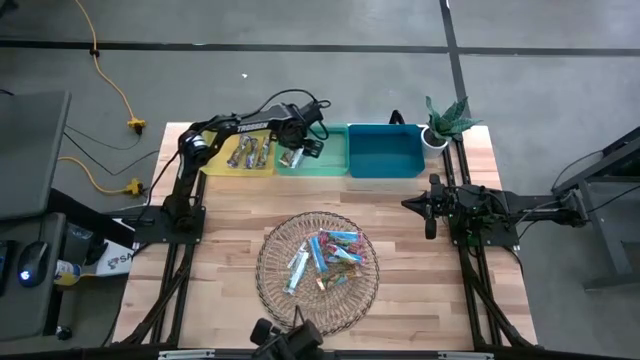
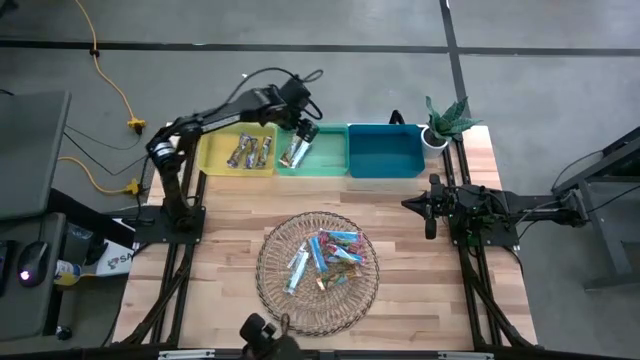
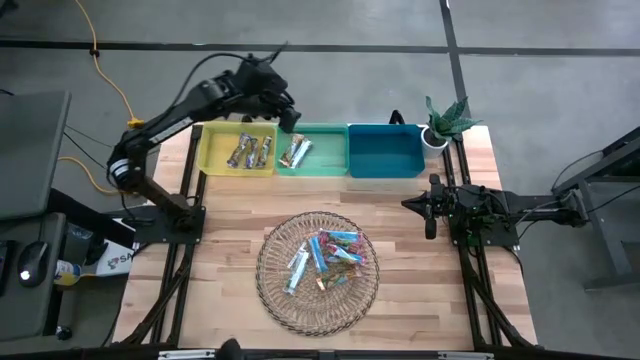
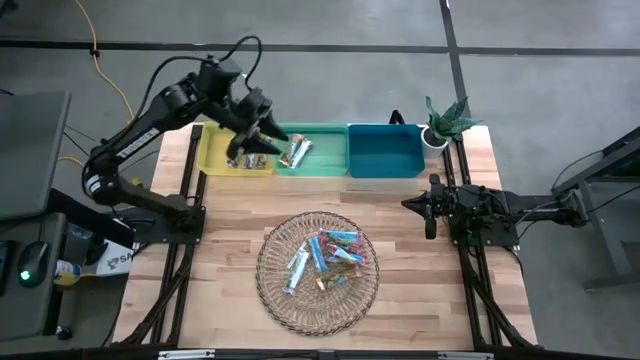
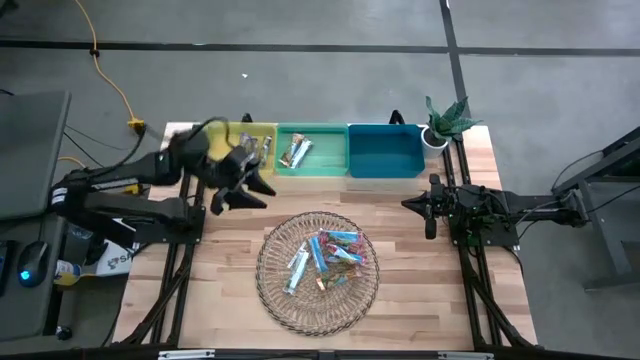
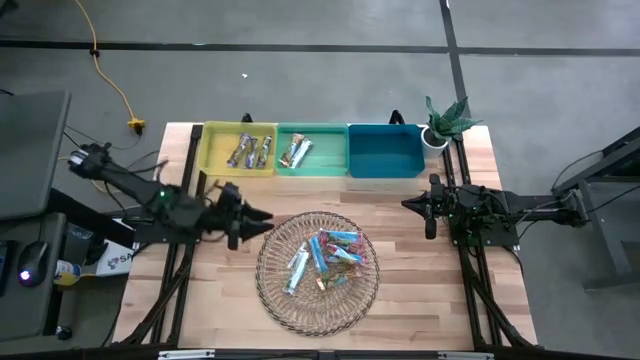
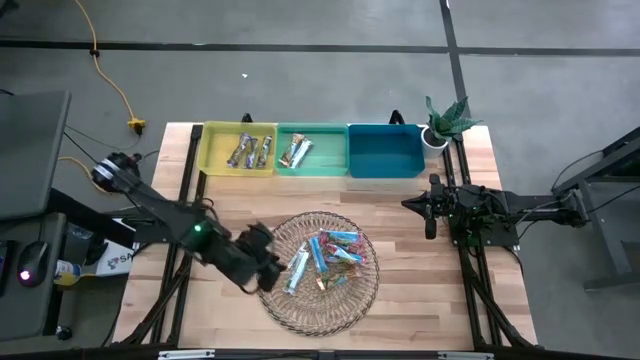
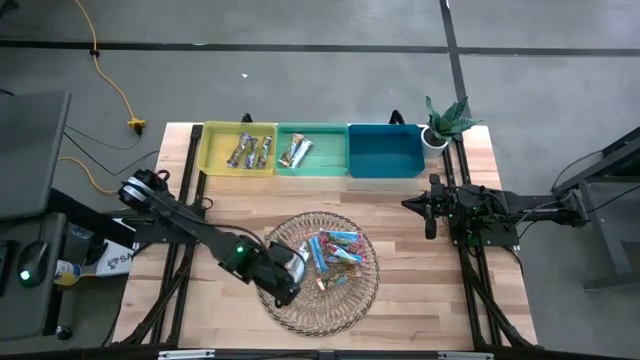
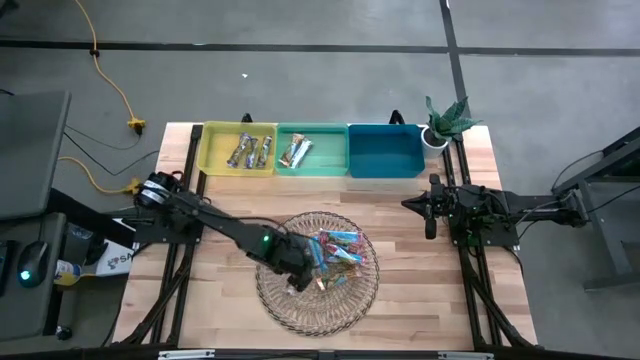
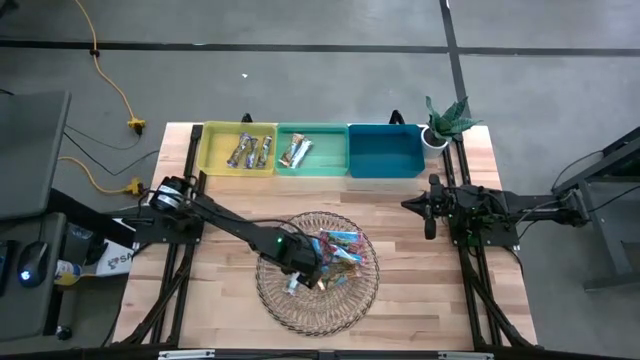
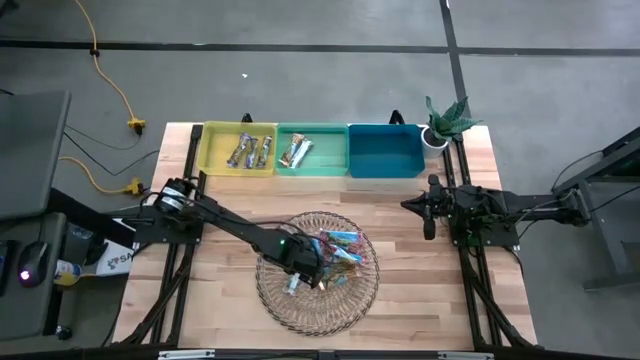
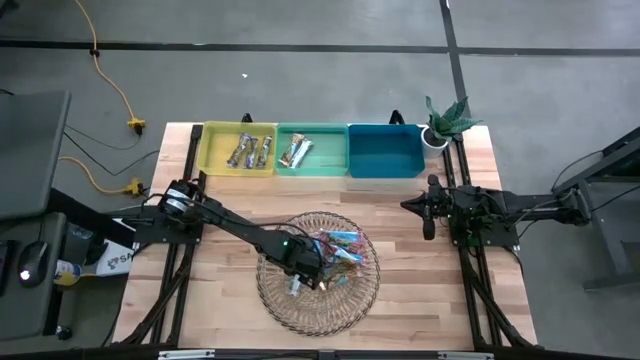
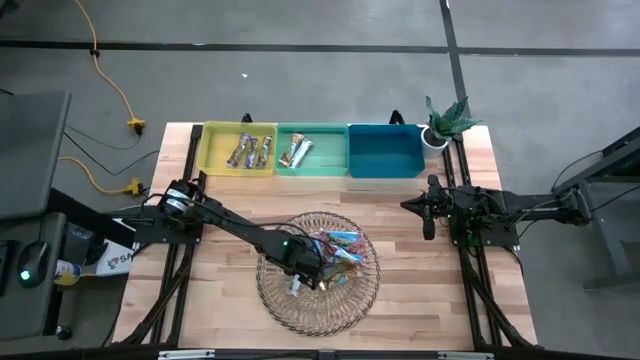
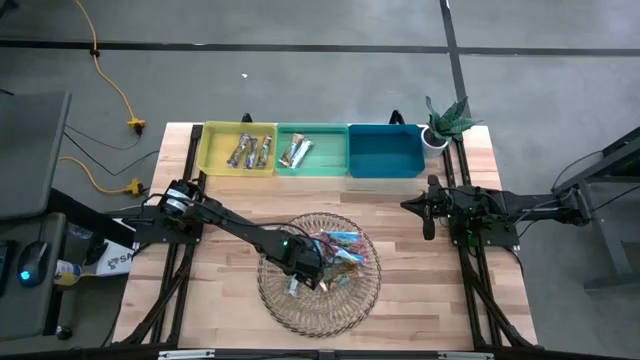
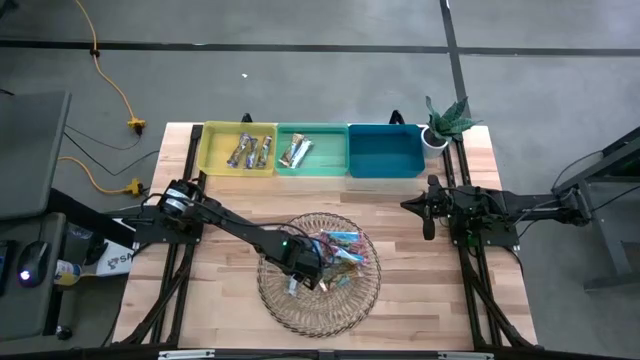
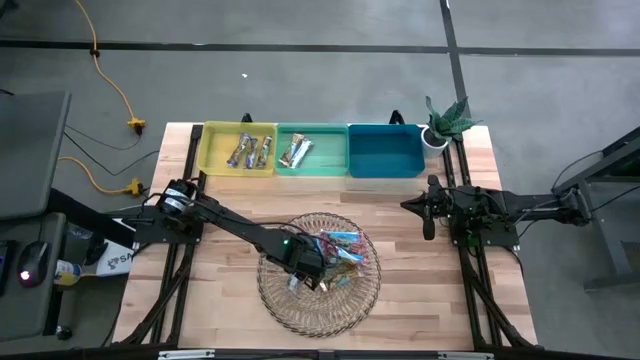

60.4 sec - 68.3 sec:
Task: Pick and place Granola Bars by type
Put the yellow granola bar into the green bin

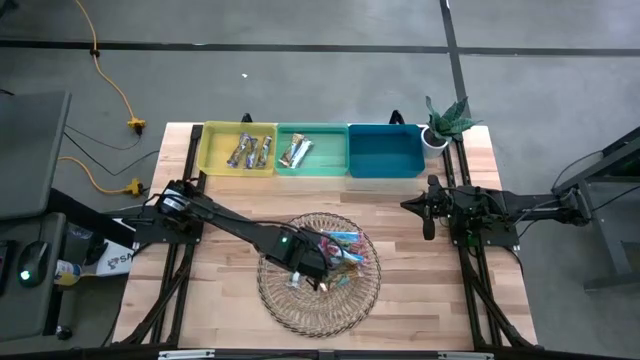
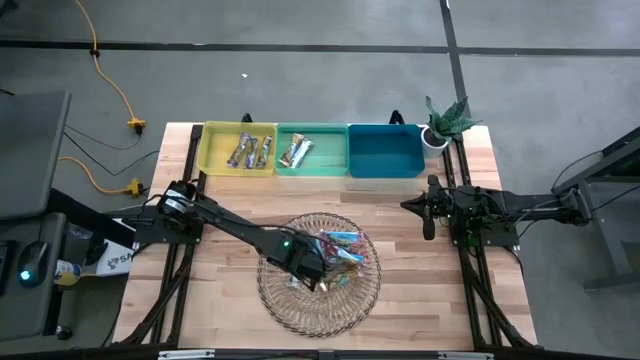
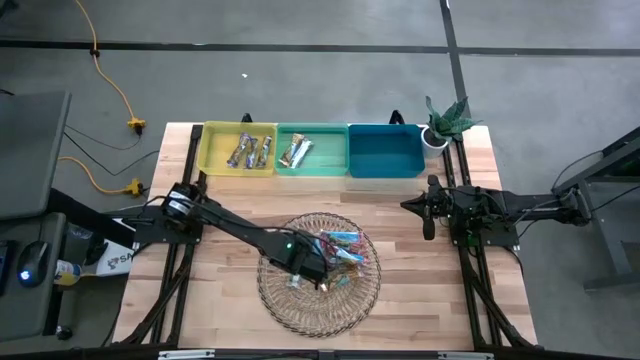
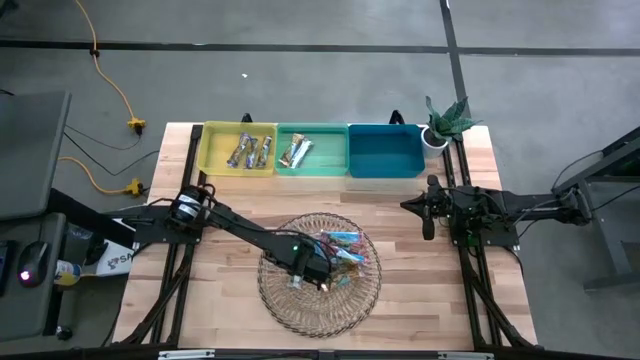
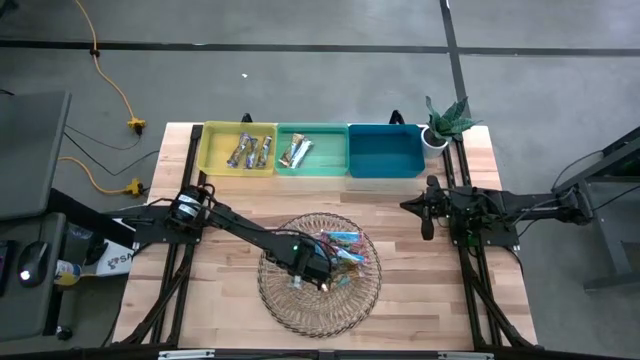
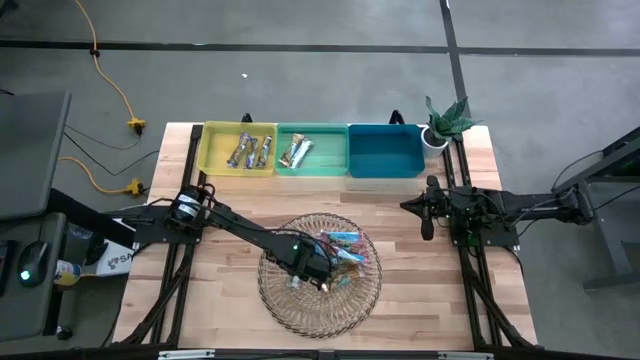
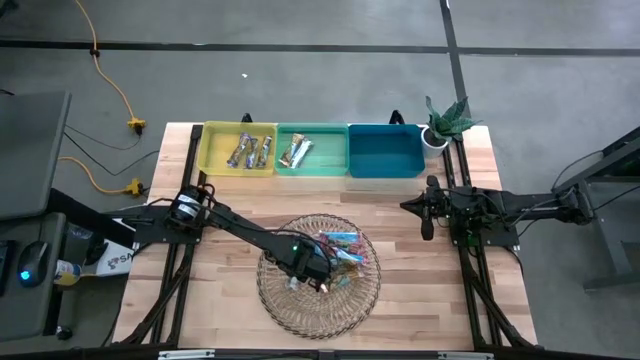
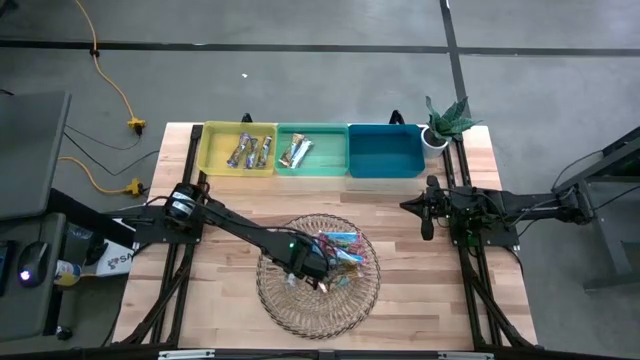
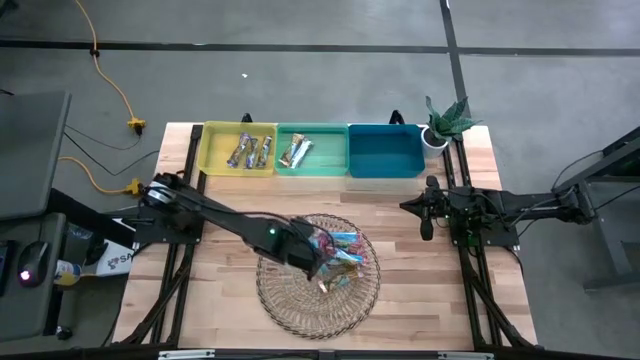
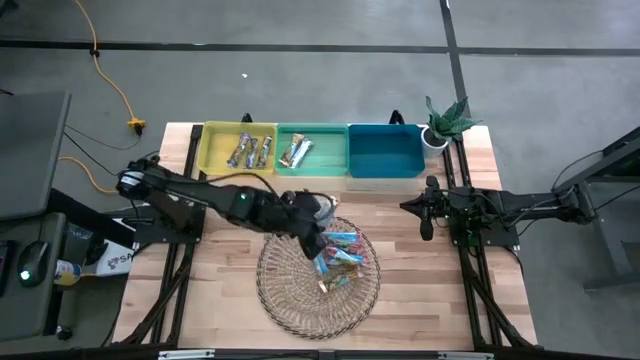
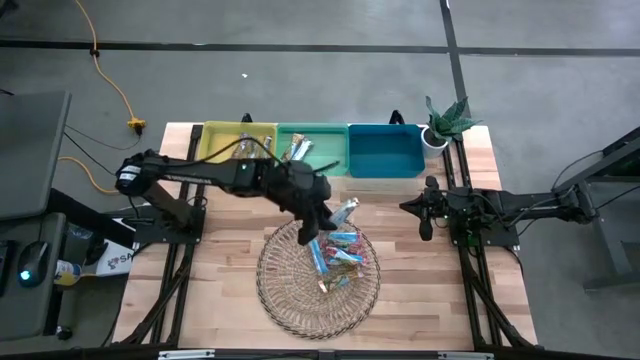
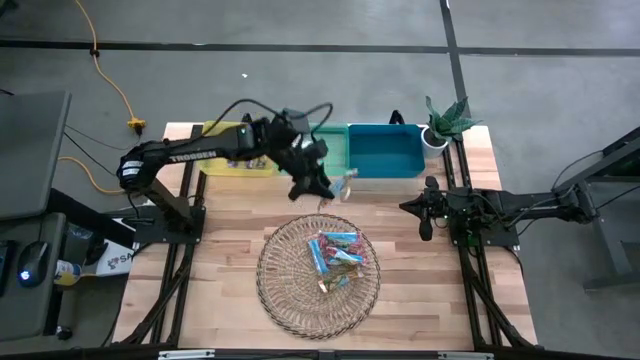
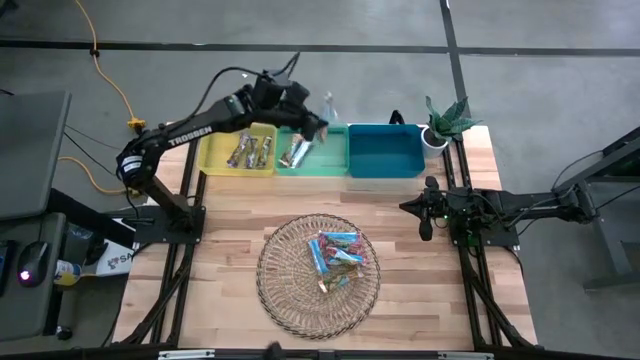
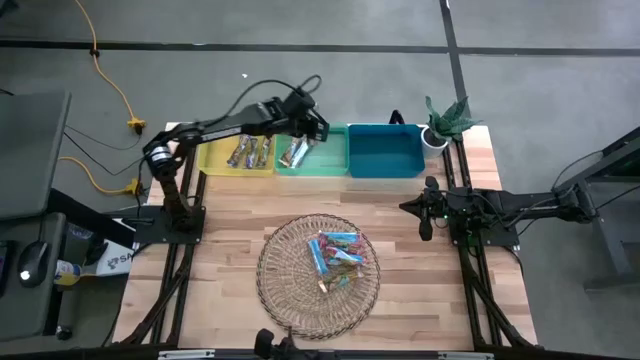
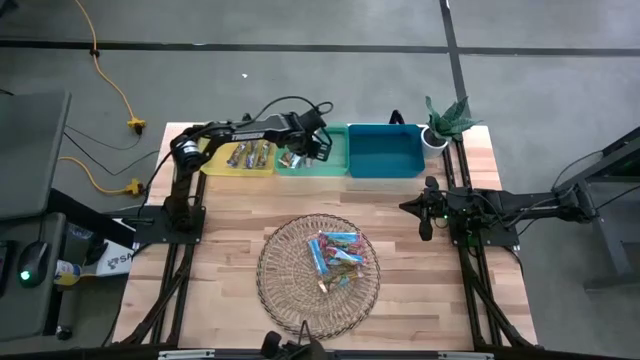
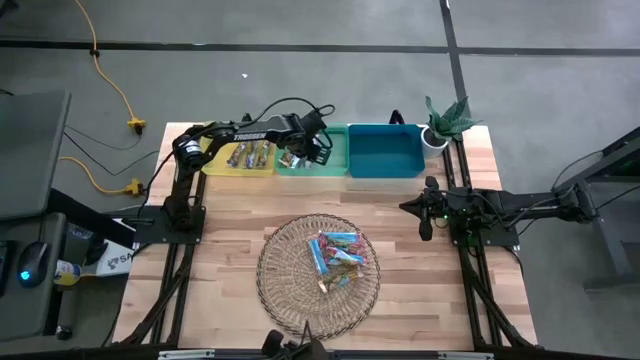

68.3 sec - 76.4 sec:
Put the yellow granola bar into the green bin

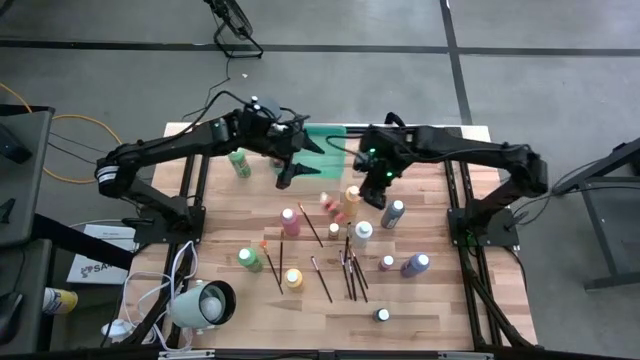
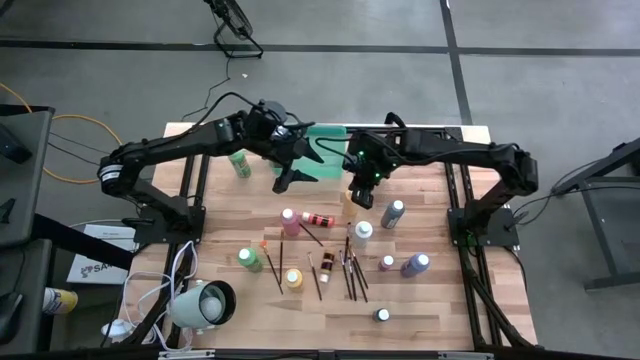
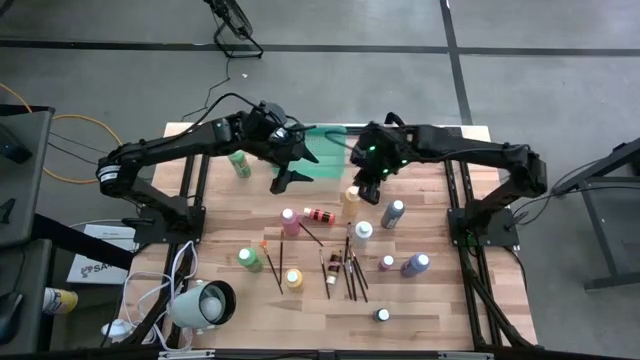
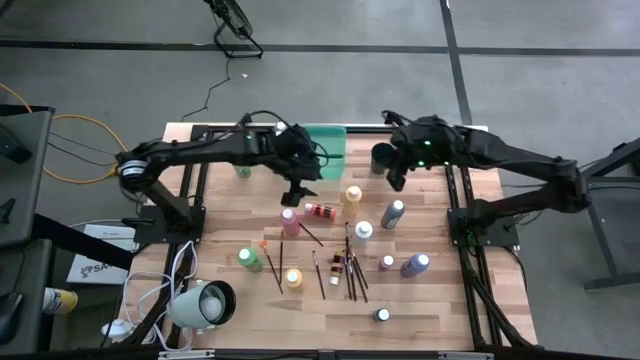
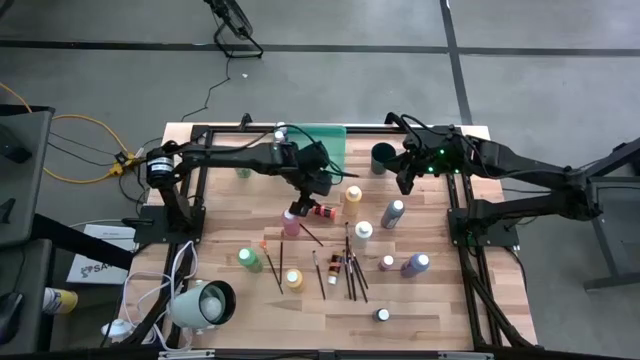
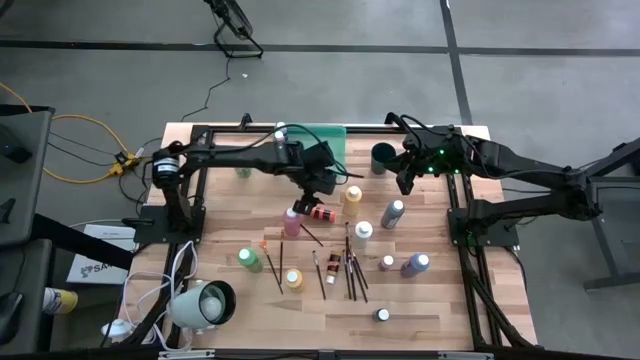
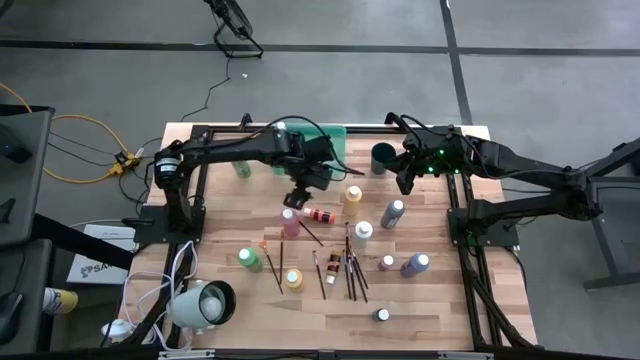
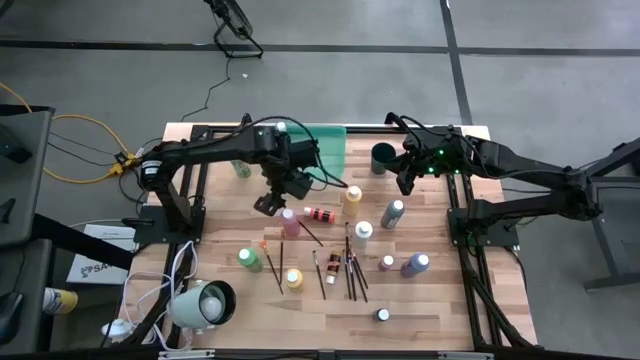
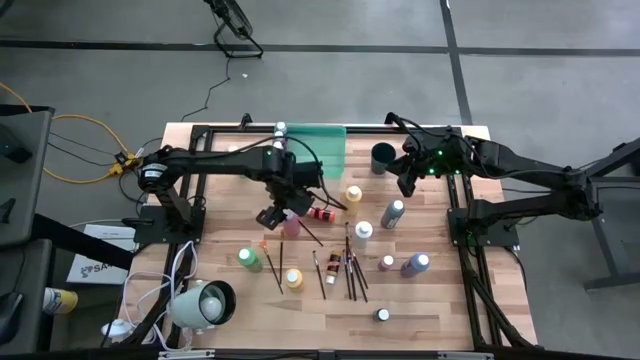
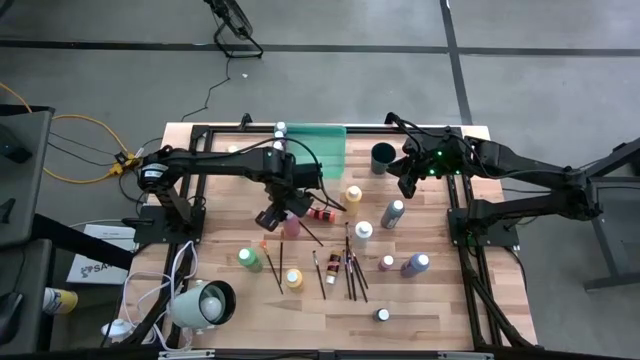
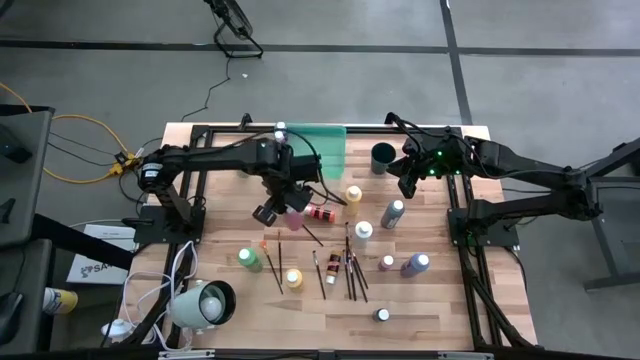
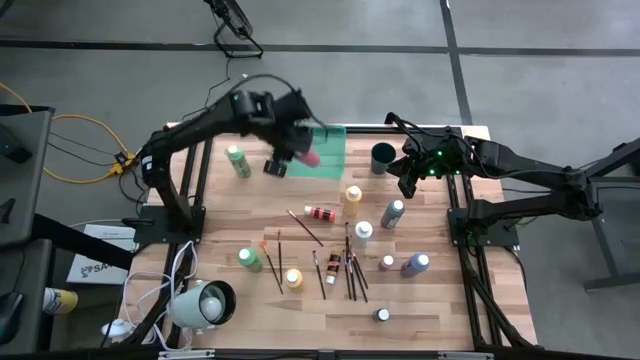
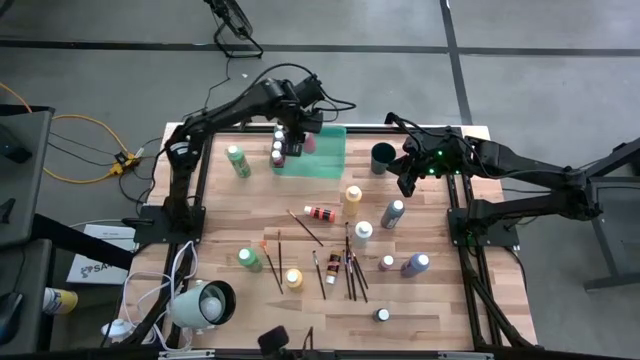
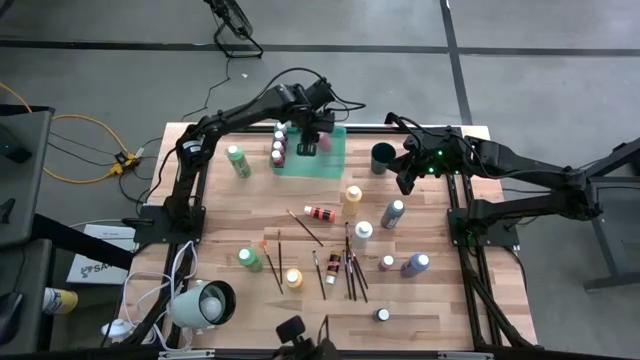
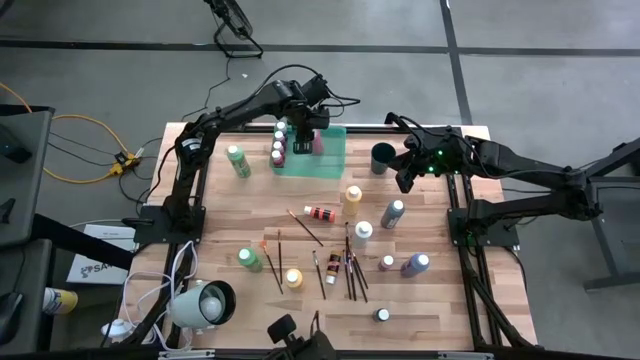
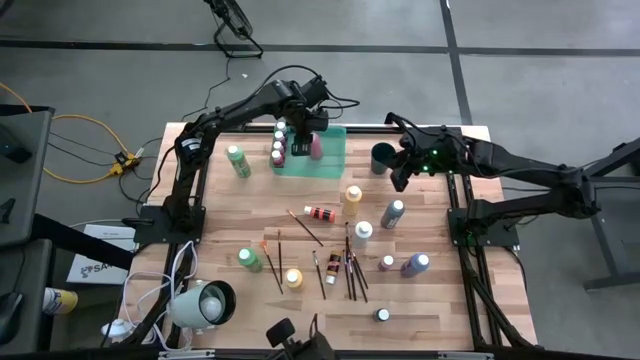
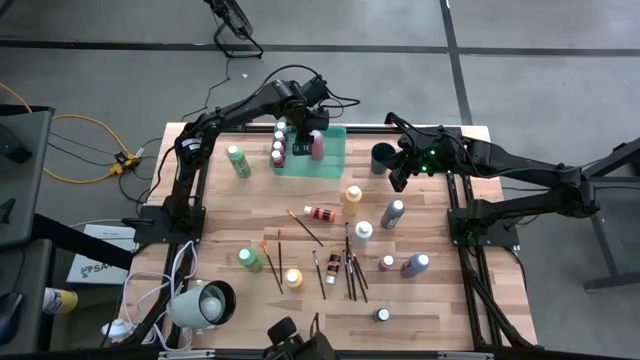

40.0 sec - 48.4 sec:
Task: Pick & Place Paint Supplies
Put the large pink paint bottle into the green bin
